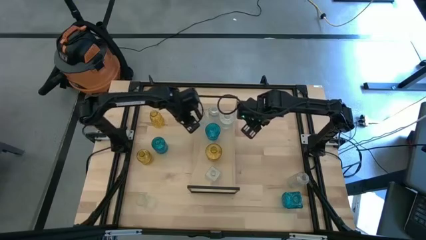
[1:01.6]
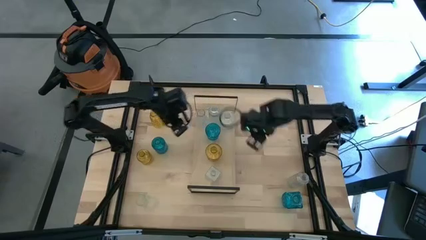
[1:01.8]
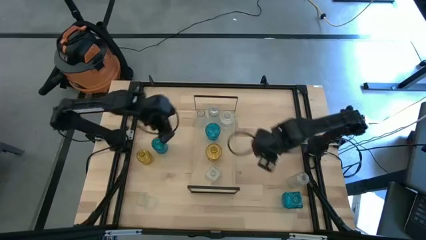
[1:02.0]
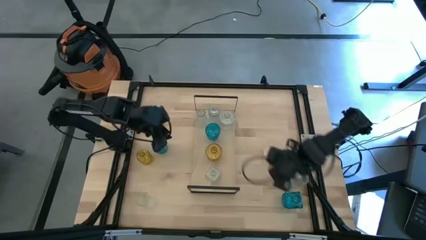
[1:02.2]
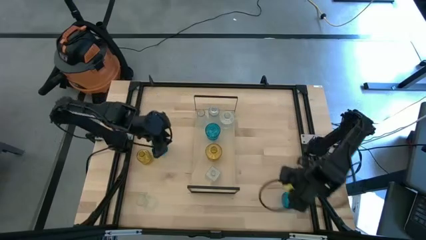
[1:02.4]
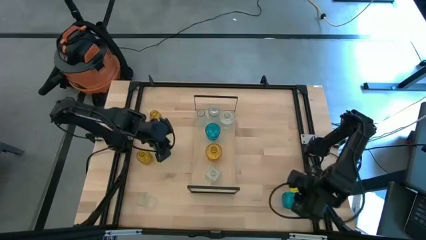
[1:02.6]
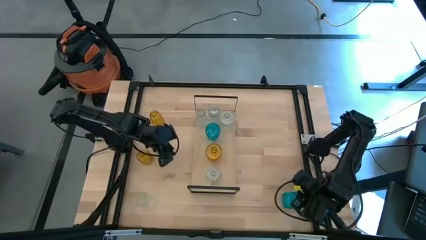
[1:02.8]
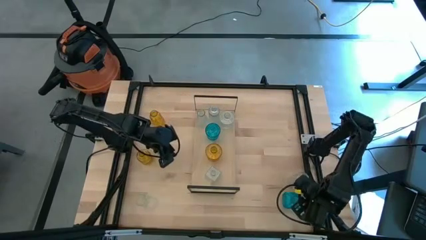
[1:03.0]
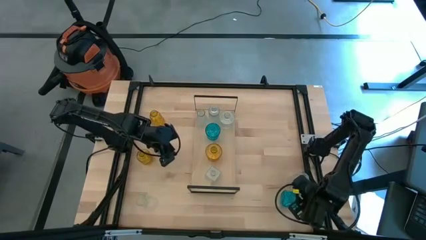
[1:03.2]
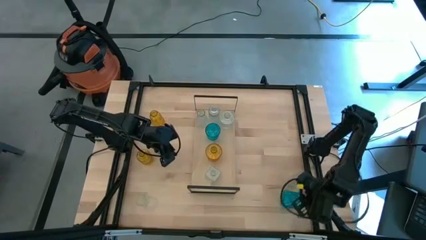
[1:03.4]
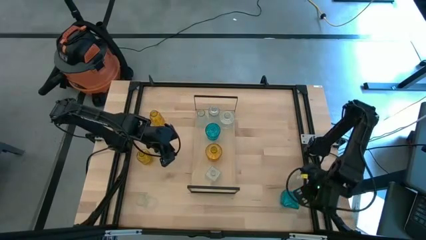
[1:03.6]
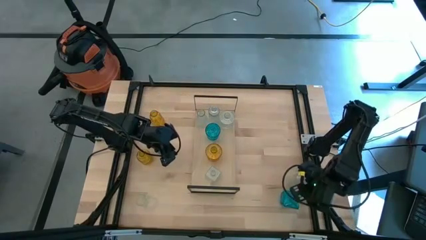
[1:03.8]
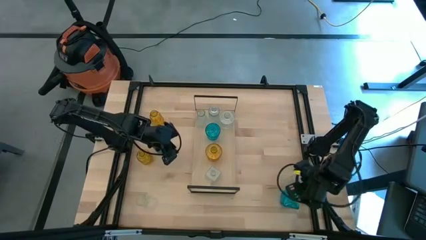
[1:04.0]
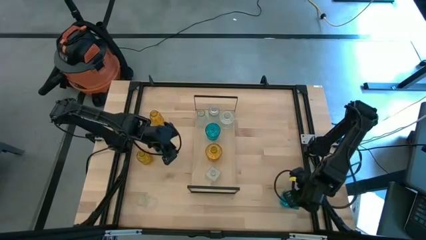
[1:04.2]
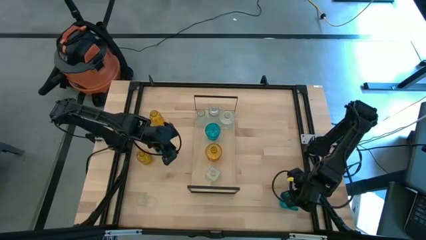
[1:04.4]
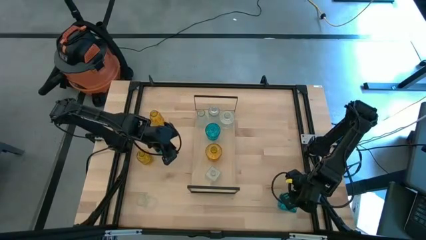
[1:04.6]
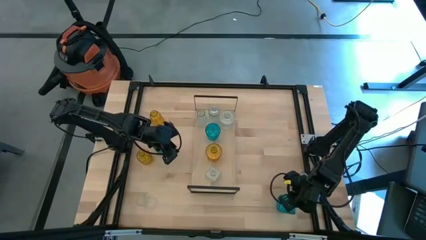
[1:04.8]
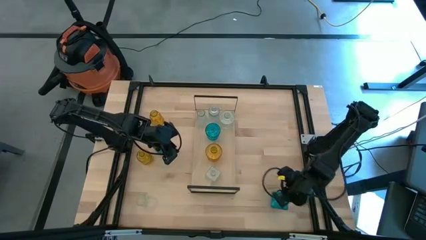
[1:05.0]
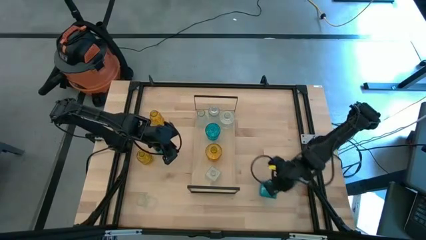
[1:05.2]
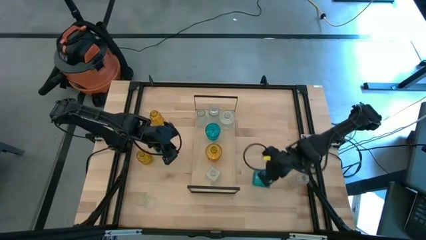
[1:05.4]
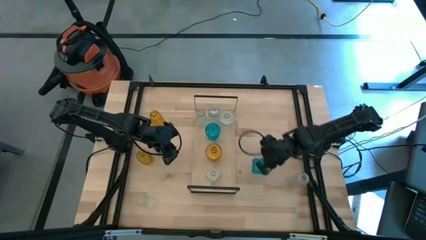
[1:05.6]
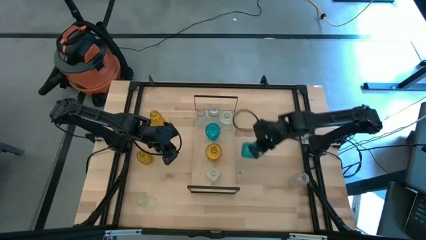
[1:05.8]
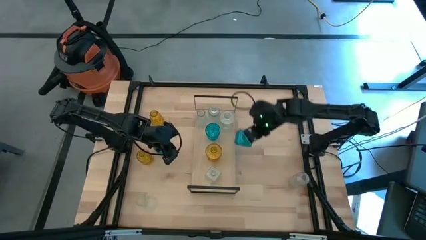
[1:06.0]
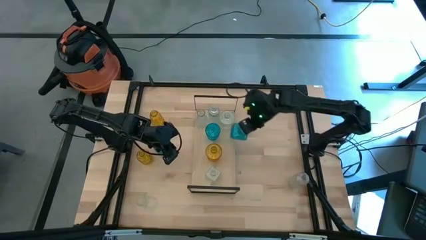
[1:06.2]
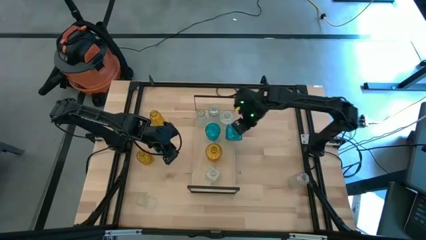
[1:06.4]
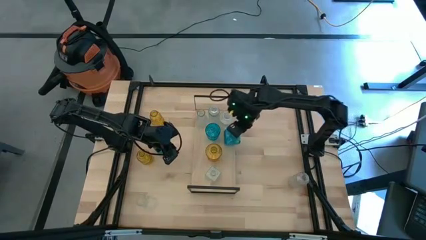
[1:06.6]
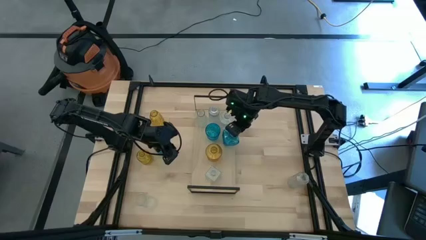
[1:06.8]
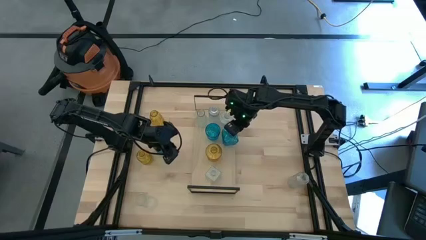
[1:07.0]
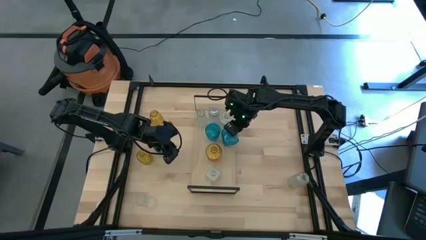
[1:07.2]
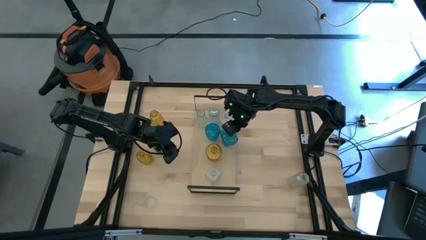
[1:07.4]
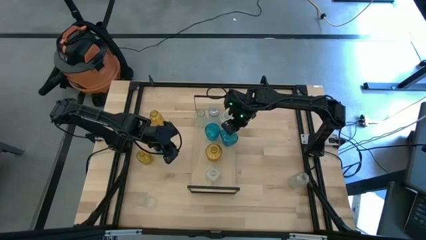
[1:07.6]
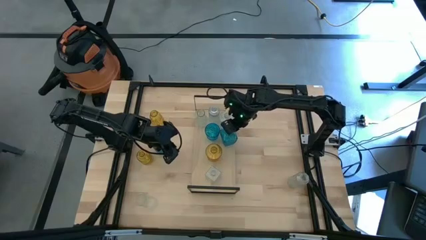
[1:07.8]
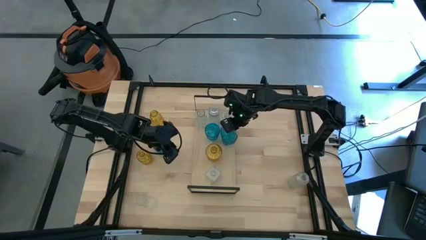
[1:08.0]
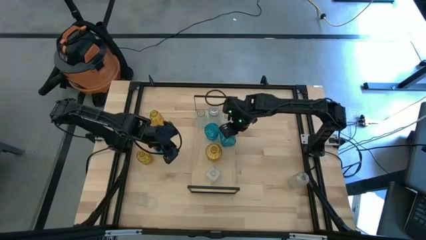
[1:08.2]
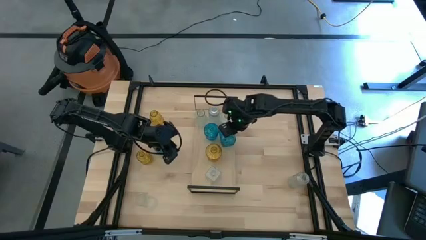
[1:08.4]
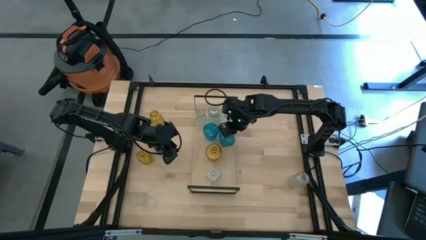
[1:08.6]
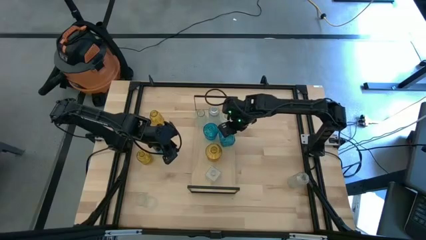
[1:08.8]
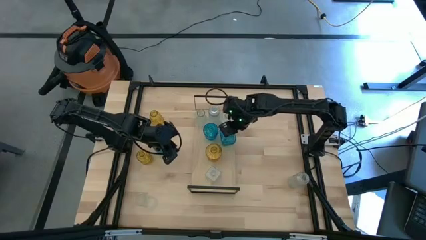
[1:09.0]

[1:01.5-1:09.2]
Task: sort vases onto shelf
Put the blue vase on the shelf aligned with the other blue vase

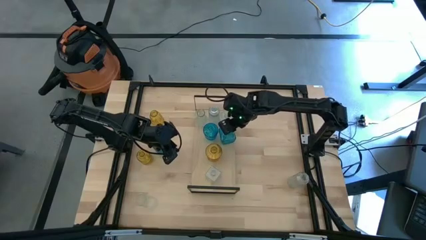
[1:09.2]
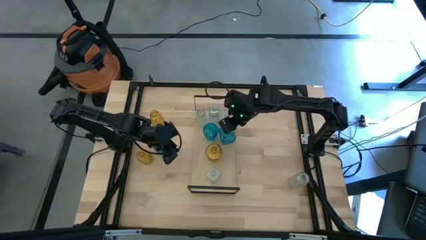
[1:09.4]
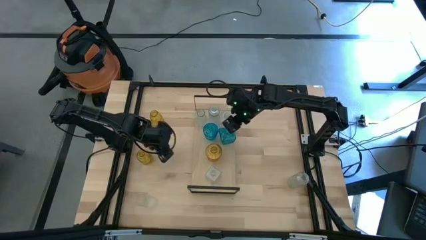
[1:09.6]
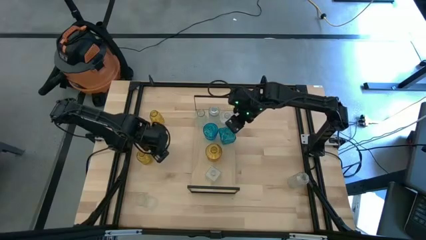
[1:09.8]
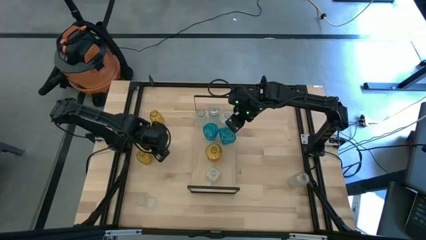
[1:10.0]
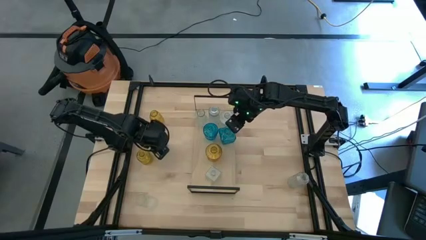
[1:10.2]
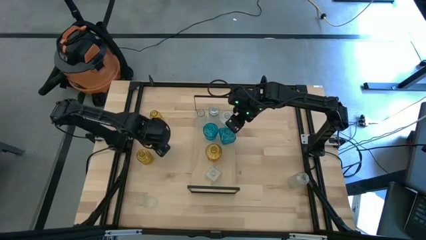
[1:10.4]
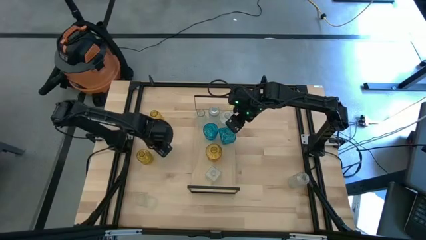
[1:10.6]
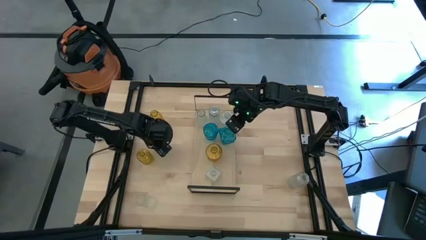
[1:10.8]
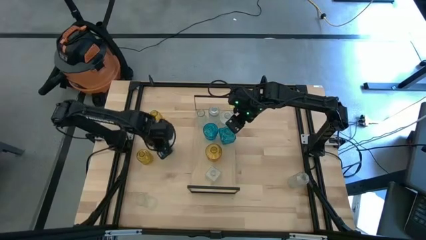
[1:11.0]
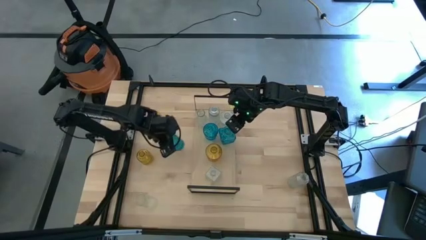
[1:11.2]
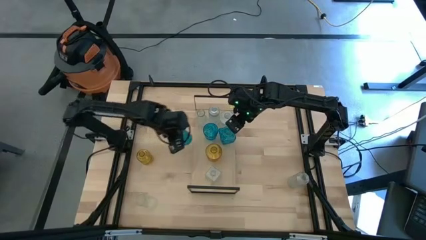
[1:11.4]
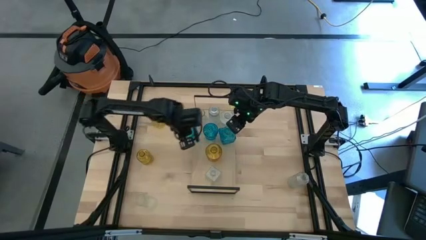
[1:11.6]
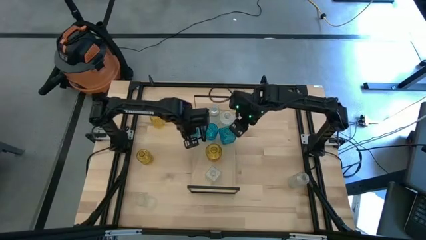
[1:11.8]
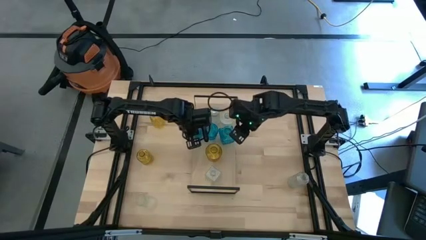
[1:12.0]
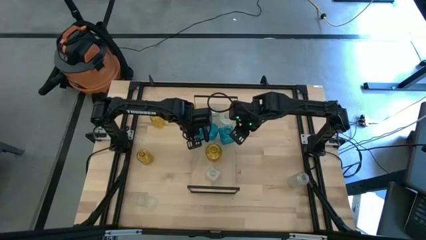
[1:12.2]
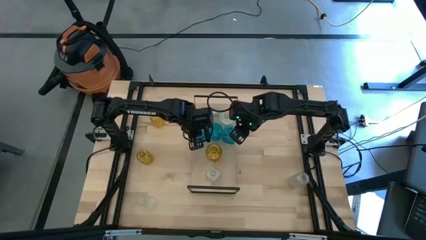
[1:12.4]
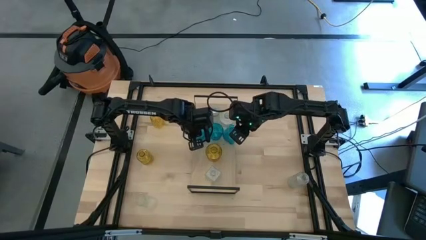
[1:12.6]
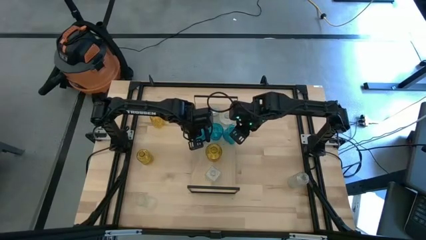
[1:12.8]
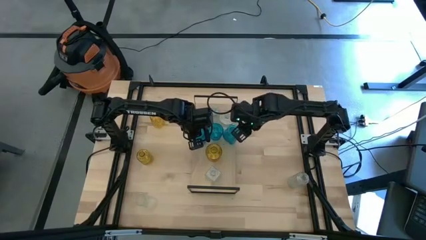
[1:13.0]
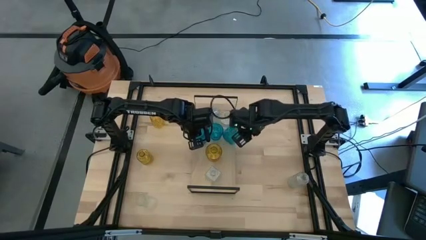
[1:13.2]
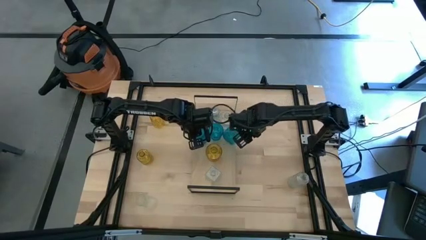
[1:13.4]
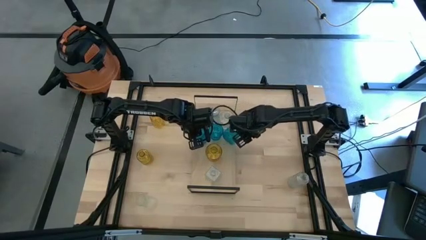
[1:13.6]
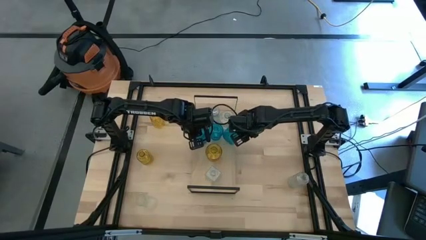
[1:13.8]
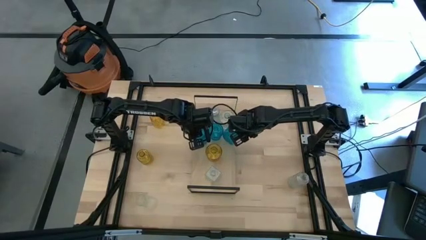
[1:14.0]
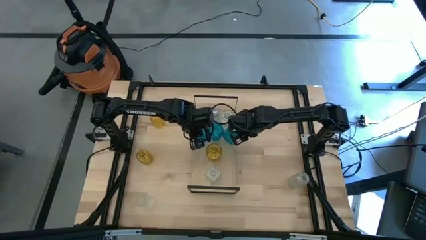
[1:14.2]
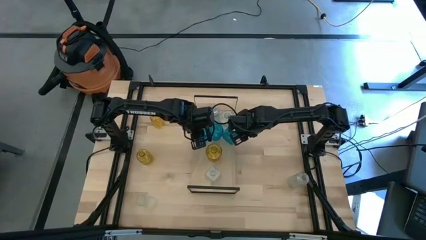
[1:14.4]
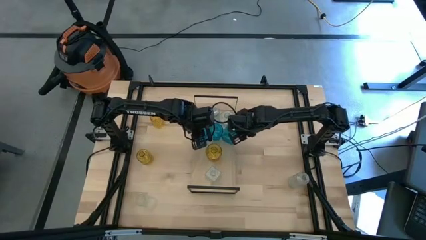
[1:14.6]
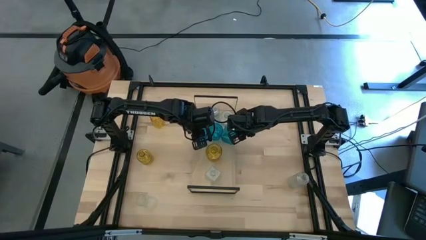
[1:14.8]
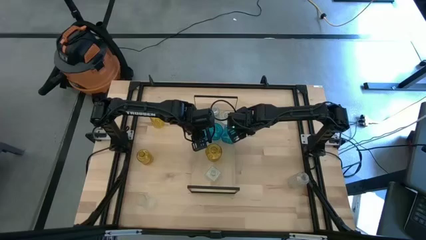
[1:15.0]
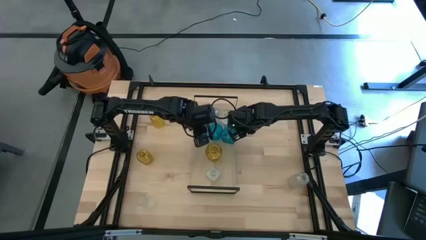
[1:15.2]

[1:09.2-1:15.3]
Put the blue vase on the shelf aligned with the other blue vase
